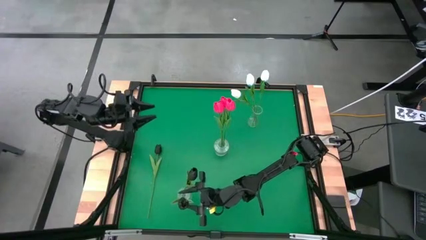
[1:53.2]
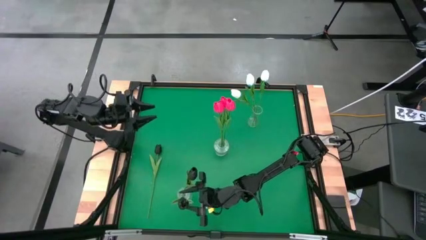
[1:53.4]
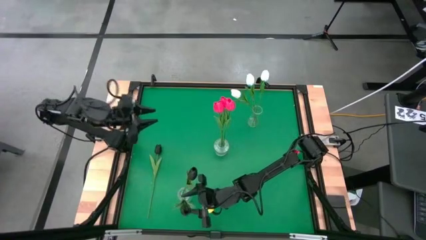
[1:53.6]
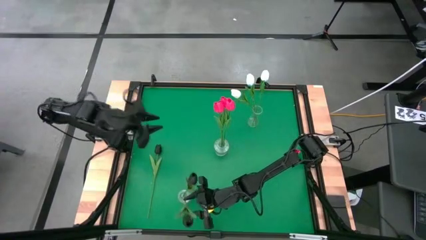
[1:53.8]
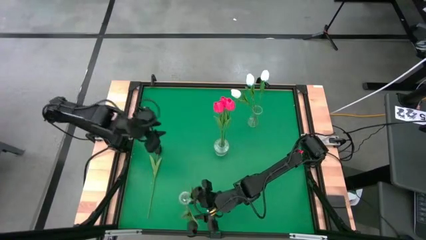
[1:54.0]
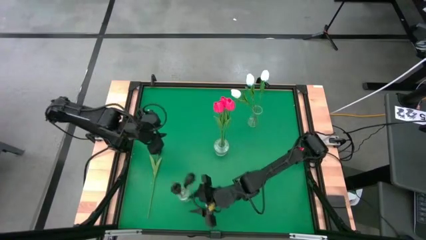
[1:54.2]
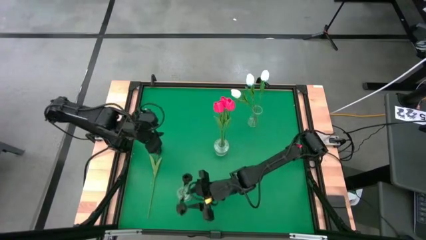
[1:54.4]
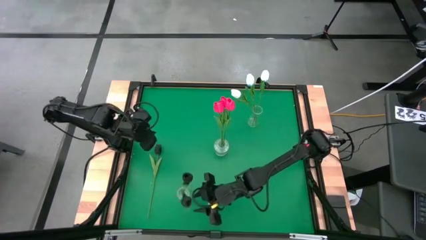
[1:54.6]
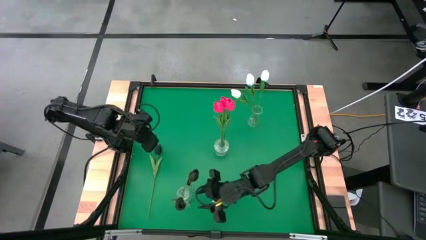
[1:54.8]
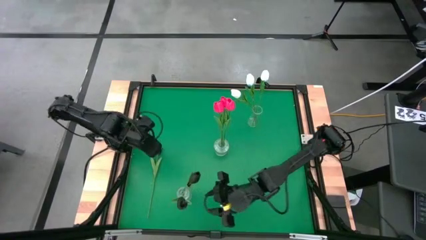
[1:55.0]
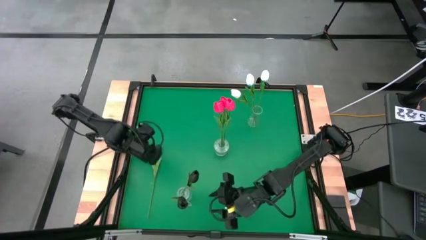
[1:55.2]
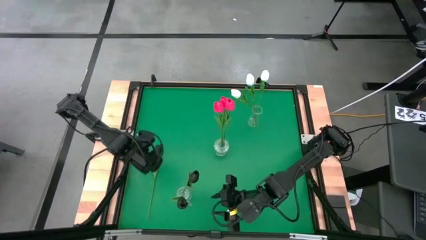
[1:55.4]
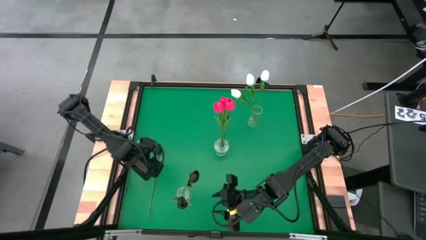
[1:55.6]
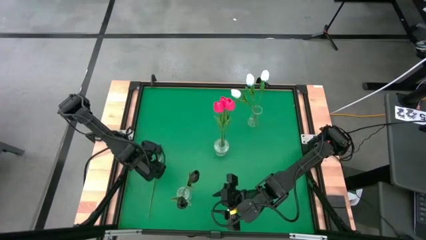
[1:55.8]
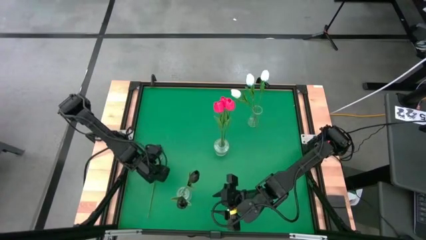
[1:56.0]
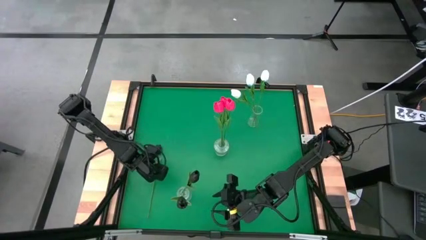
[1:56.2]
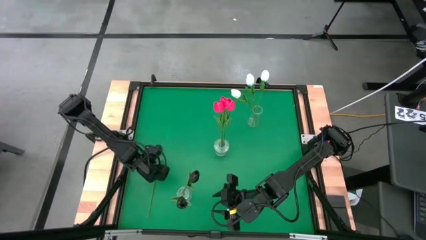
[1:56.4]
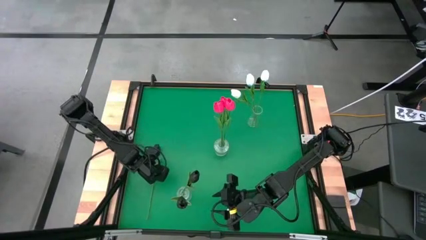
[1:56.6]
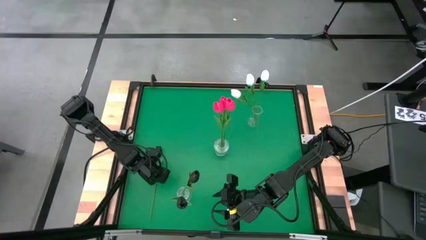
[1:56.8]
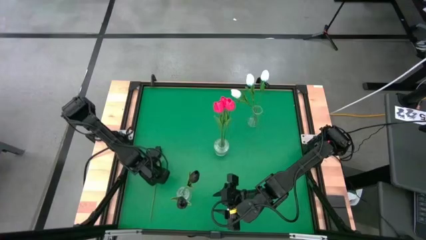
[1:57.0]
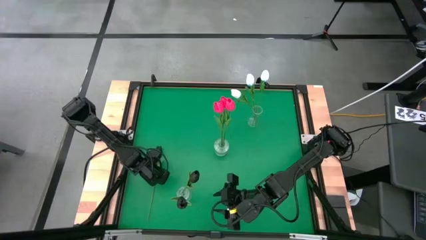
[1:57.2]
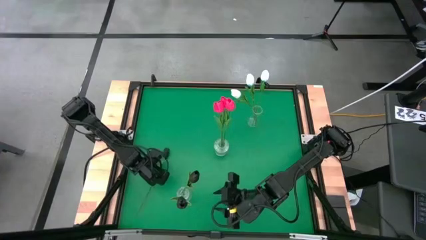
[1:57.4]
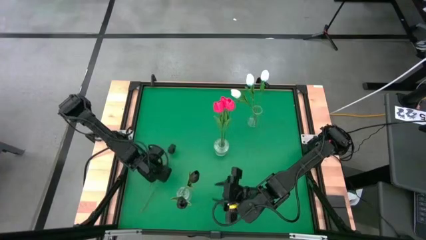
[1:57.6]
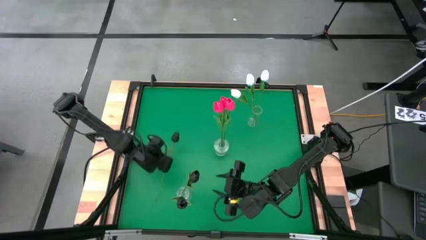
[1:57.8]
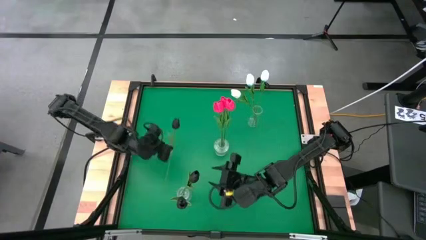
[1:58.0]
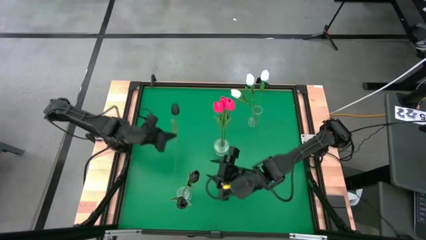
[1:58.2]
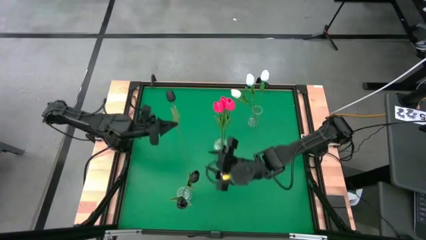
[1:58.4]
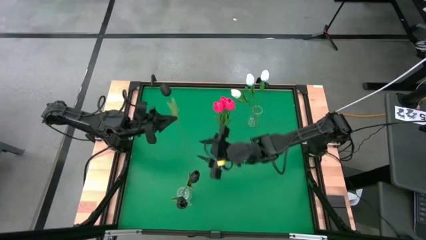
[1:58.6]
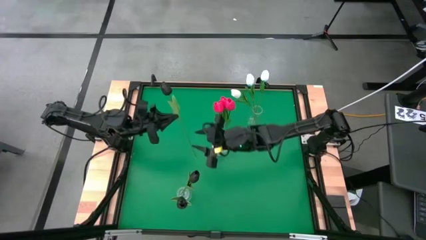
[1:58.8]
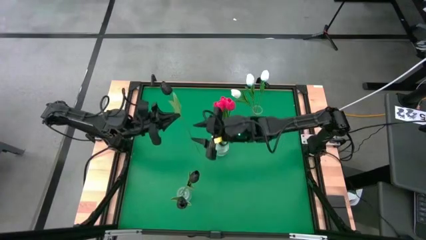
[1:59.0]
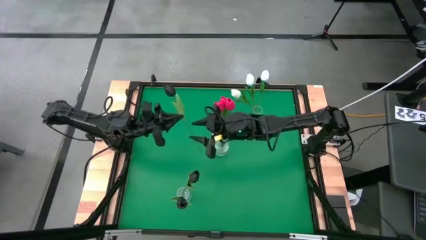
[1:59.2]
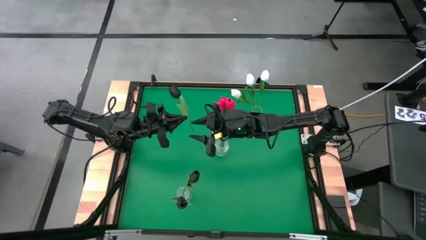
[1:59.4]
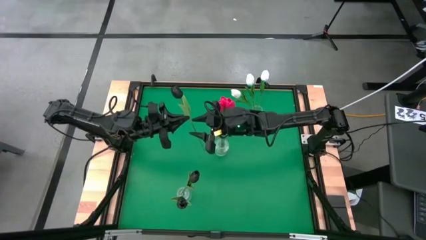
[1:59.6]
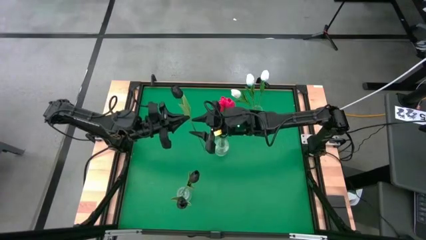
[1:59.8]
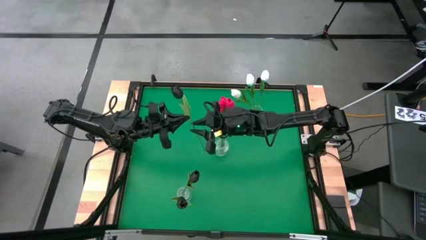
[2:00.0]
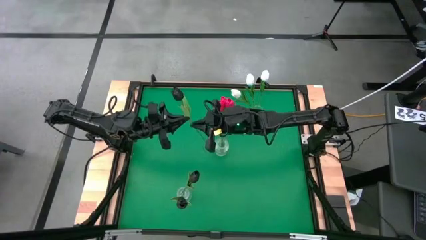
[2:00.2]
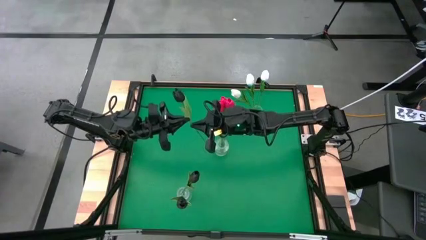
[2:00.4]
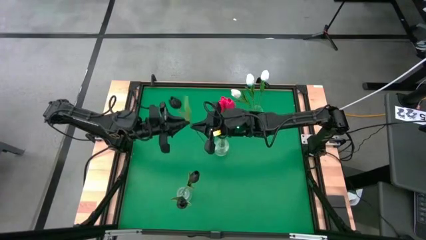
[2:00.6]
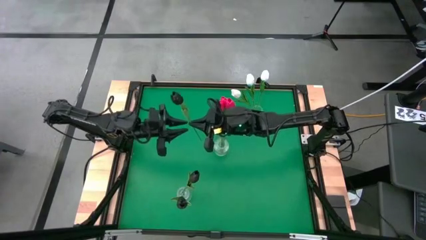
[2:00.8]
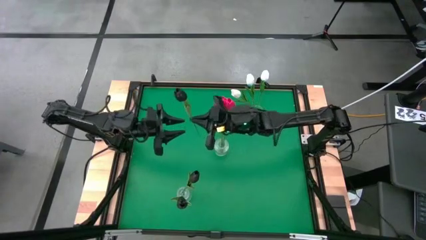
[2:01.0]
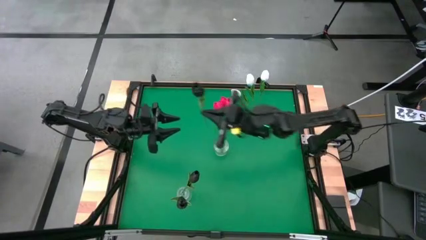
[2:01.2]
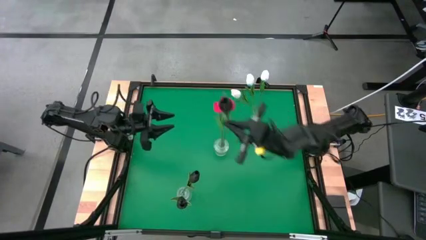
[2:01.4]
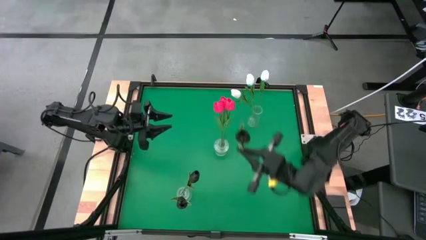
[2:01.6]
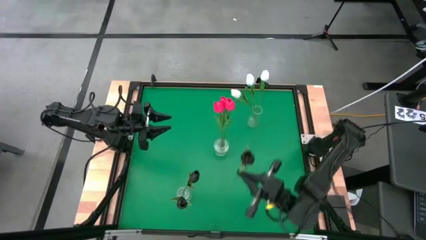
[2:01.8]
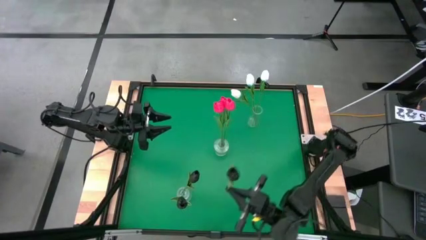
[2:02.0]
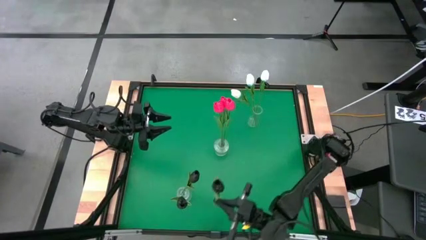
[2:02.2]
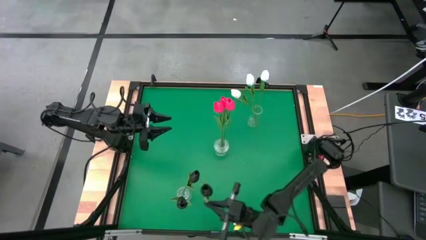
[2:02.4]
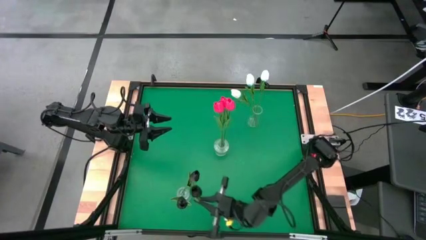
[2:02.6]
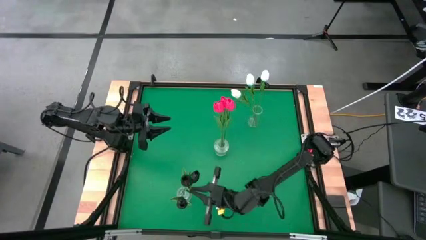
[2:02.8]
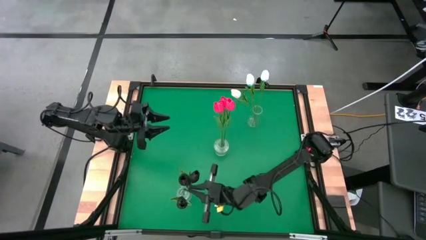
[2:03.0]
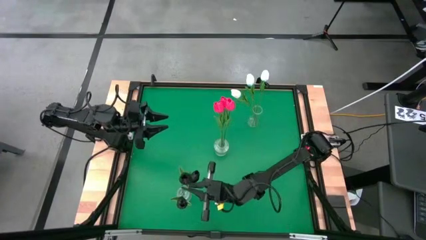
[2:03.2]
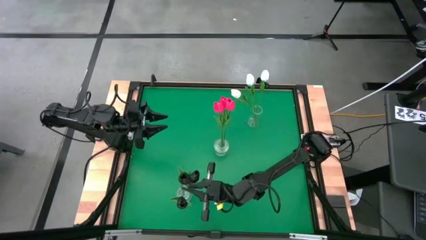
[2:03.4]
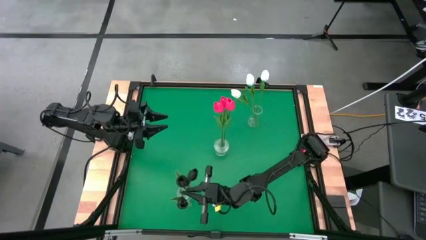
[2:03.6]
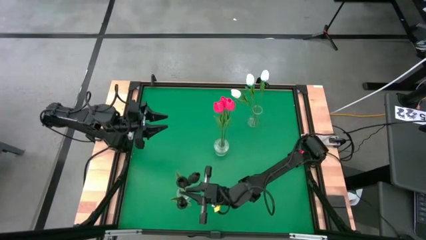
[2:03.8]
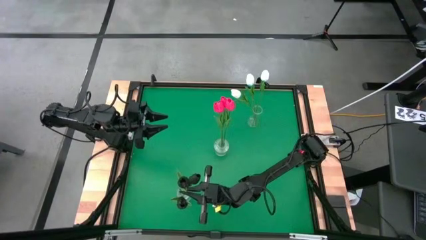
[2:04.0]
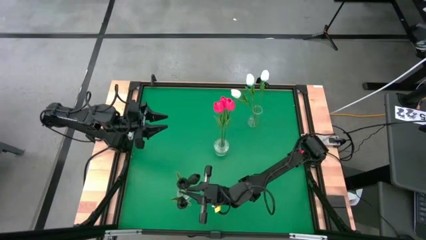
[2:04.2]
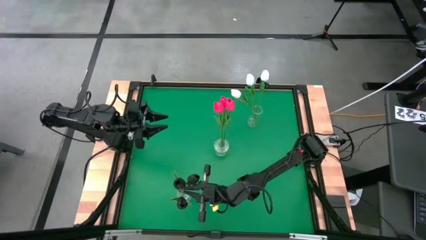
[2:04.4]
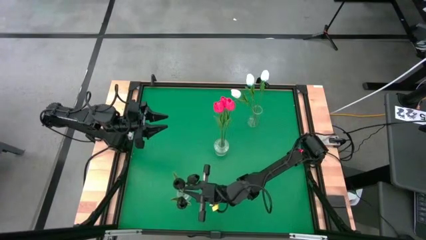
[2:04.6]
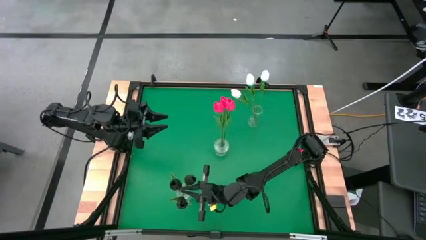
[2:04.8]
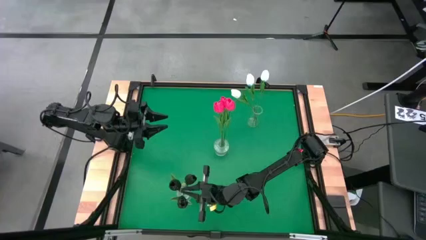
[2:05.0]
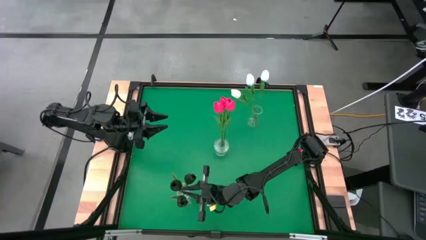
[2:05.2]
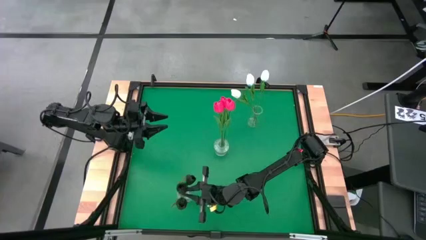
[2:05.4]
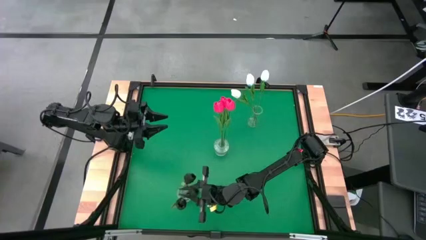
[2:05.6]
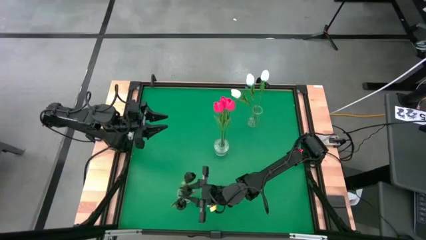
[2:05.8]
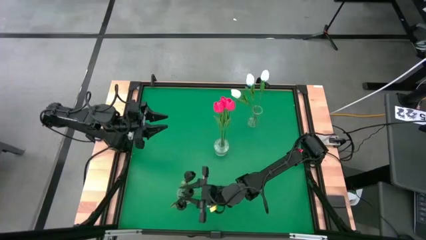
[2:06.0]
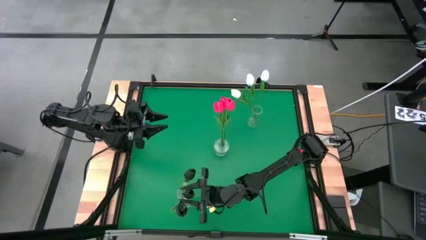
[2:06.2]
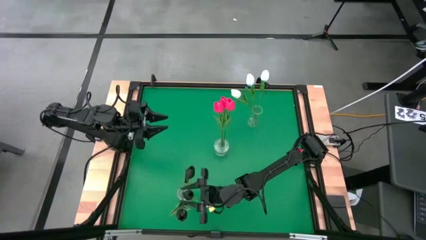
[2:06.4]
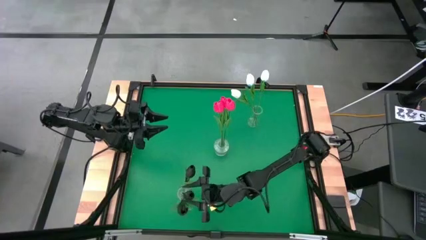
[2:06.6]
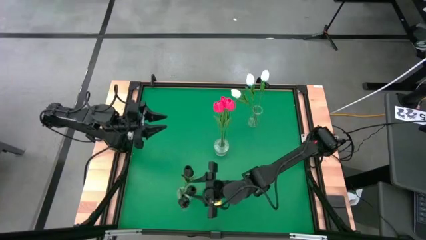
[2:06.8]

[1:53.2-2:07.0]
Task: Sort flowers into vase by color
Put the black tulip into the bottom transparent flower vase

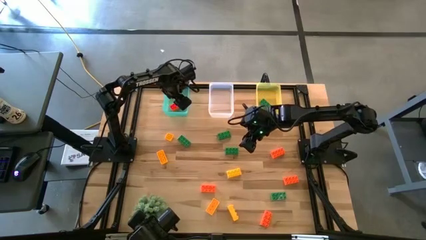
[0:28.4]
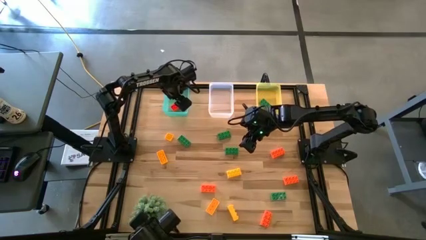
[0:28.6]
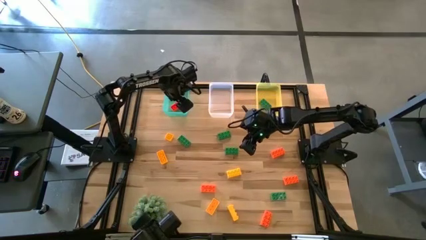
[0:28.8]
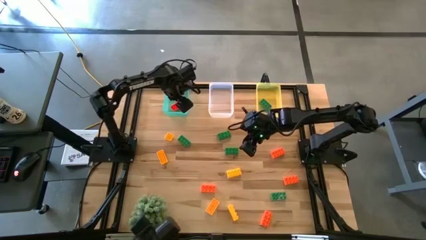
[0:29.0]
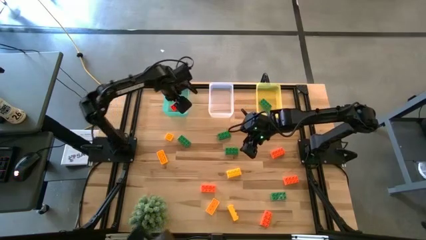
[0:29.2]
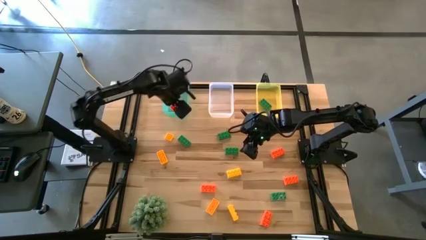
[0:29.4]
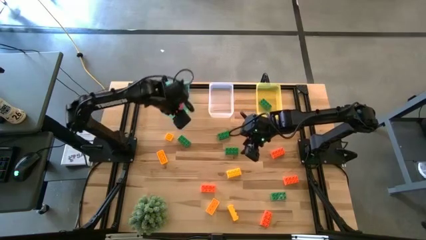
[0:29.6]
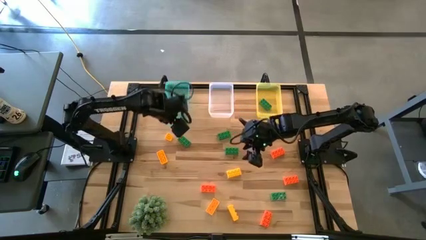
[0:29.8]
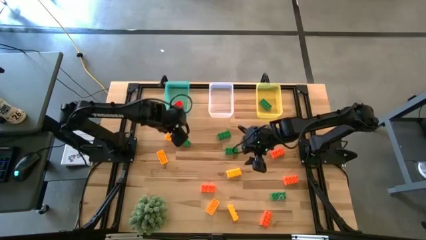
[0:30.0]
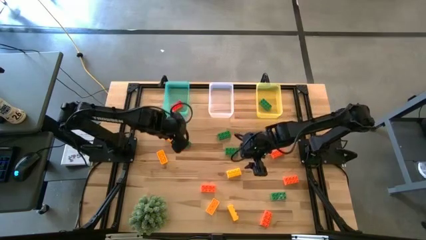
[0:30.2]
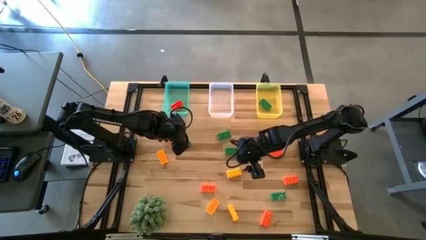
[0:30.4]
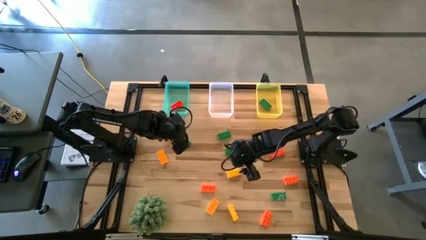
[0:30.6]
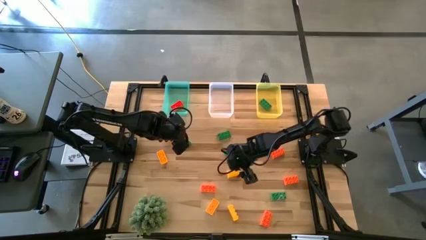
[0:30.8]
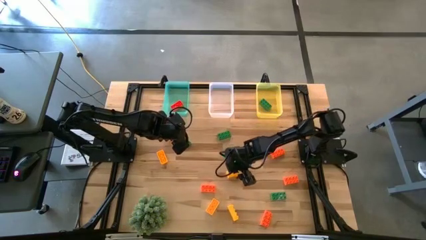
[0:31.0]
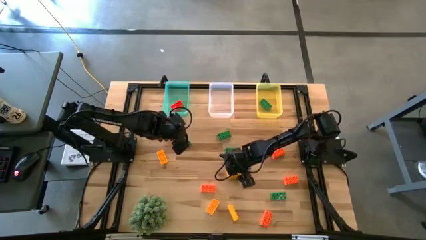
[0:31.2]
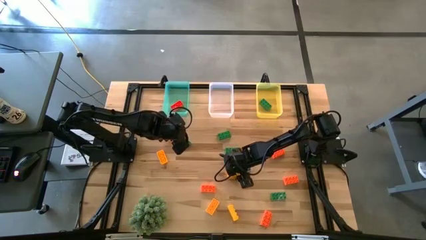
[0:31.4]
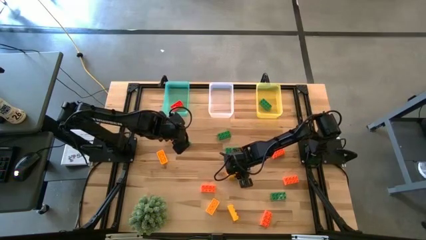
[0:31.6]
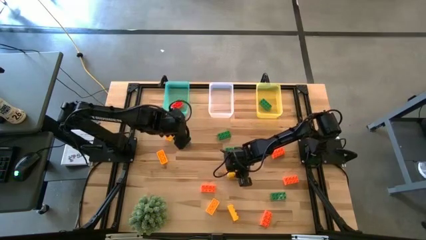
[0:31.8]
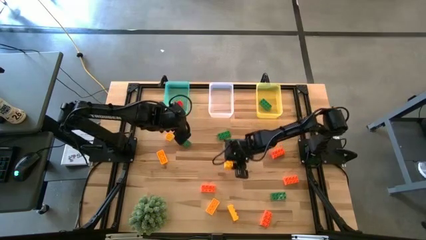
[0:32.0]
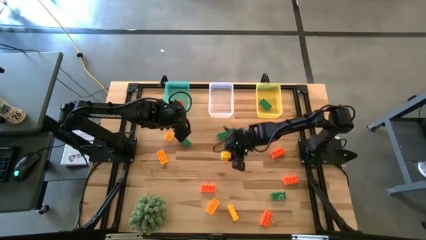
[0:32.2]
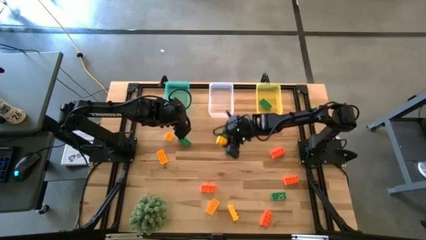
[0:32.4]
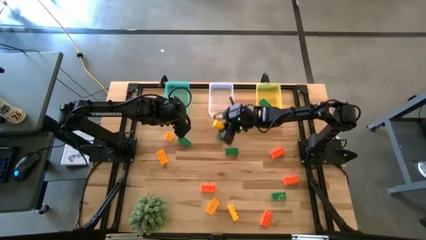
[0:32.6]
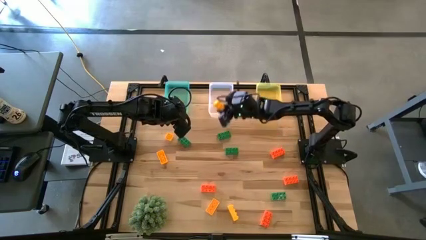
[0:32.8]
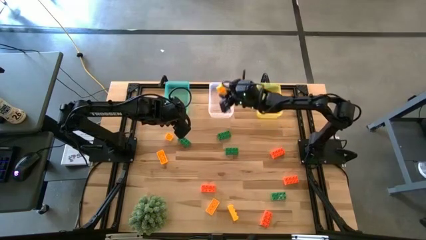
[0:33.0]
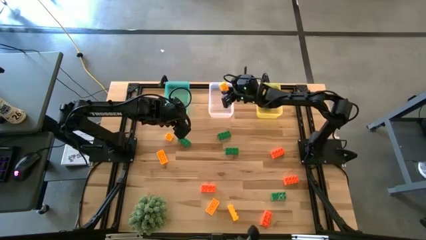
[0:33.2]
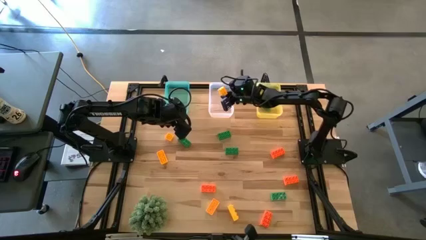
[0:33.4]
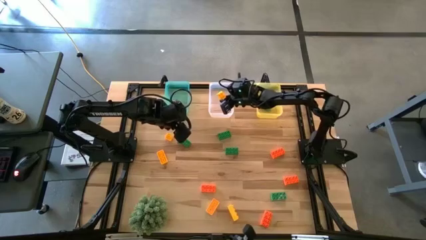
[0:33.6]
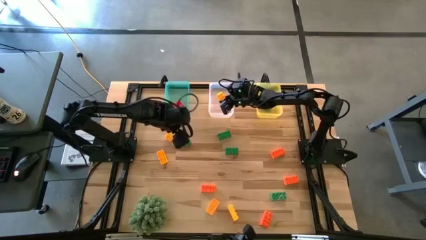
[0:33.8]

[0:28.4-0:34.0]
Task: Sort & place blocks by color
Put the yellow game piece into the white bin
